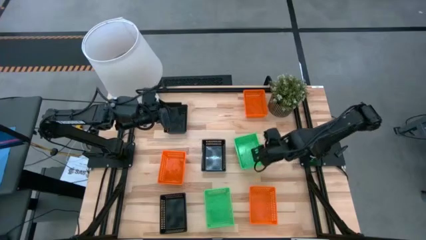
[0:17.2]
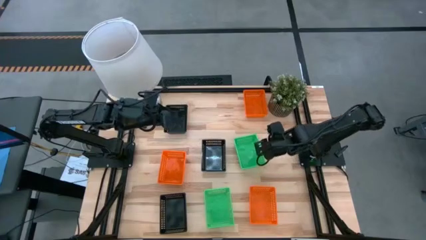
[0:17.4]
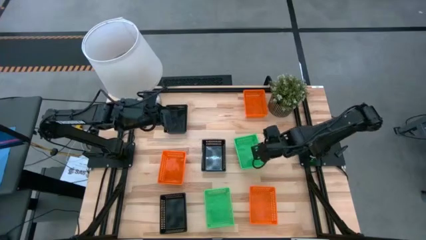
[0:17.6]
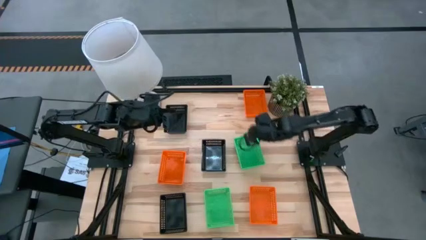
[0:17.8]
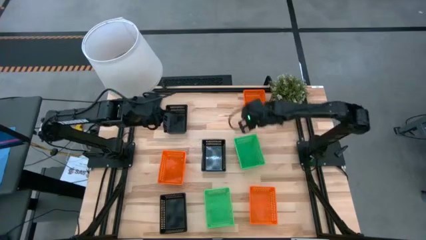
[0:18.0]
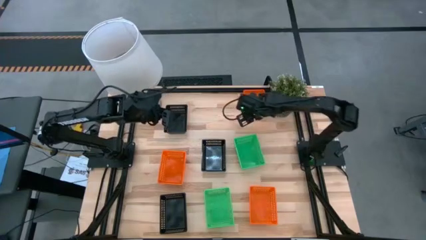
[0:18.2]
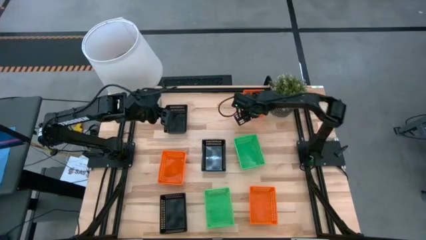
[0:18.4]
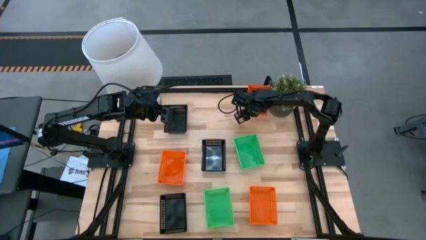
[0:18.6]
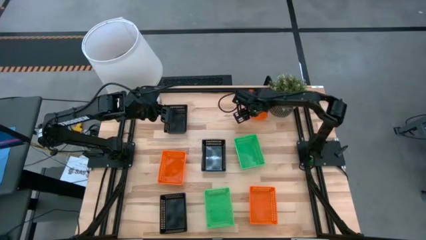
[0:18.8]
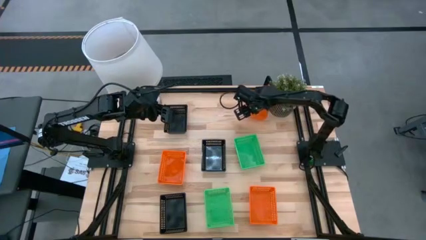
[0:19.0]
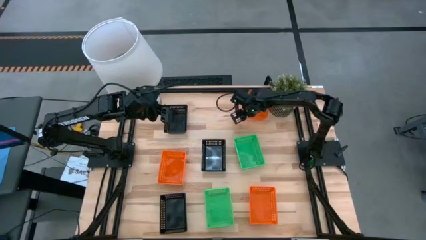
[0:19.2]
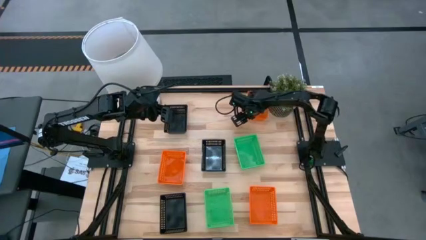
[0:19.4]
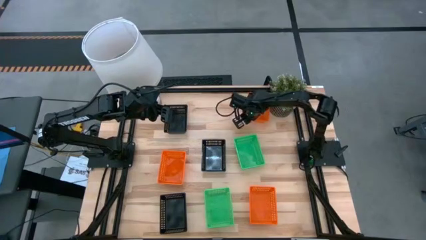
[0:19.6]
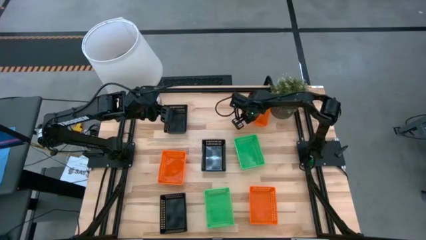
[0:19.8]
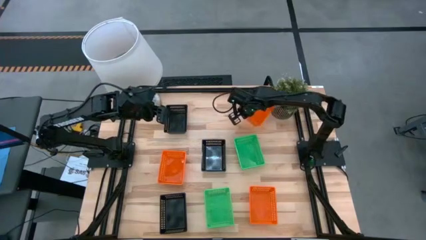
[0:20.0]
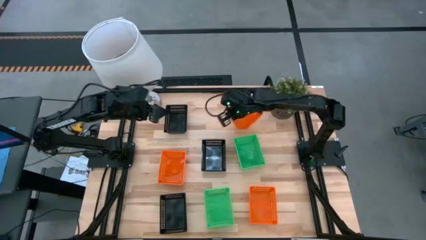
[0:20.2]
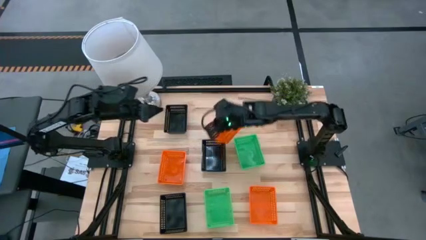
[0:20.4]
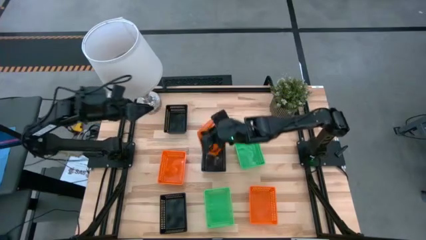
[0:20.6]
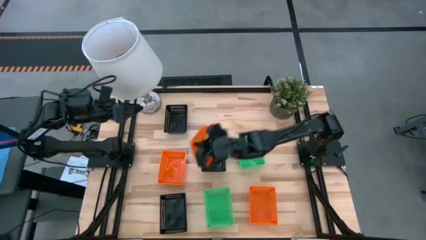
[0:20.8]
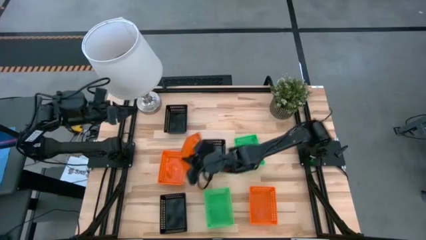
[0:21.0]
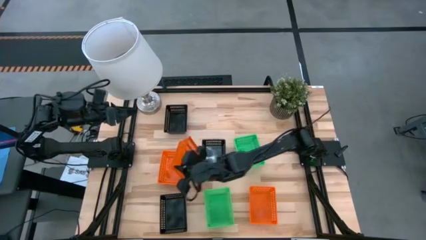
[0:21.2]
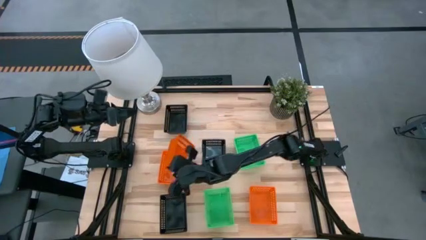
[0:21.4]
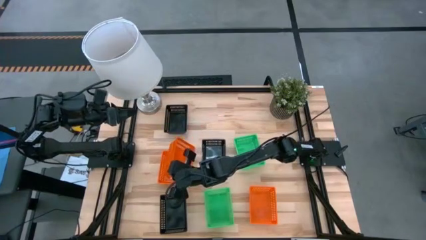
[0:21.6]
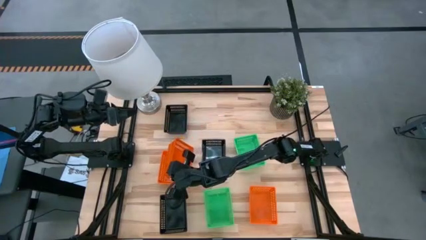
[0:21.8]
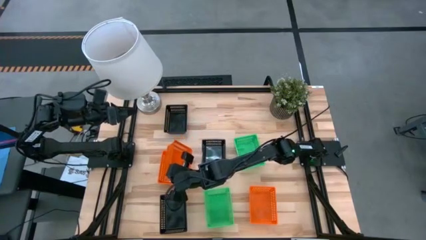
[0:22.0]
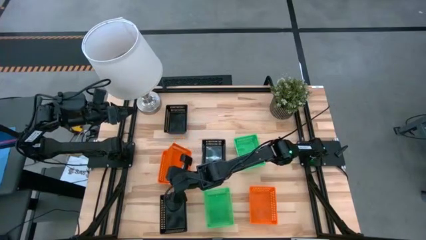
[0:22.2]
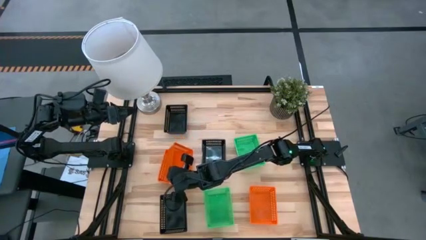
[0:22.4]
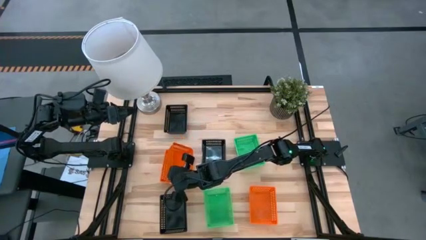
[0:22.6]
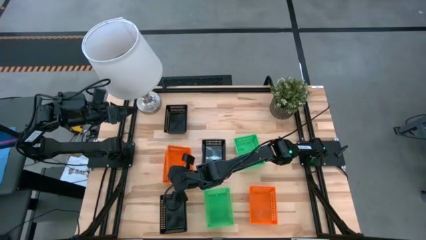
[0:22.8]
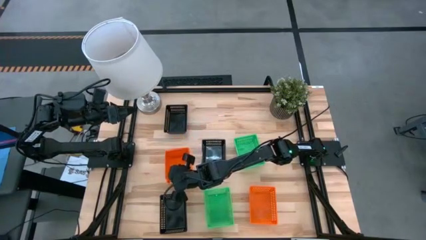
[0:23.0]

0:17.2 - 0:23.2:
Stack the top right orange bin on the middle left orange bin

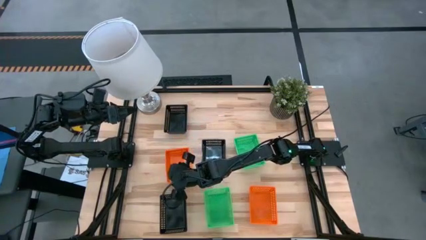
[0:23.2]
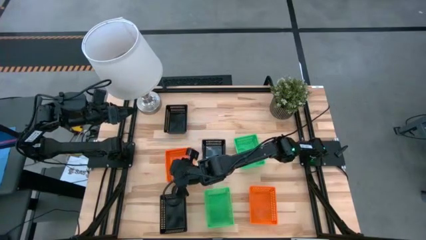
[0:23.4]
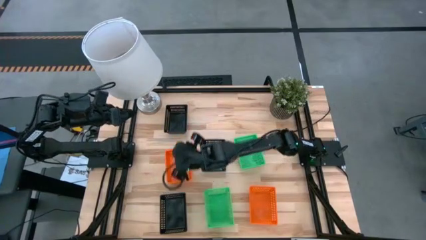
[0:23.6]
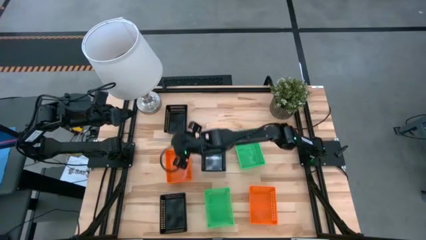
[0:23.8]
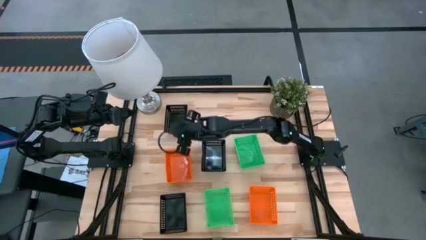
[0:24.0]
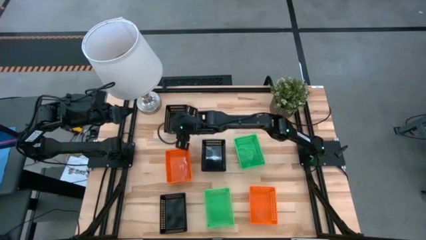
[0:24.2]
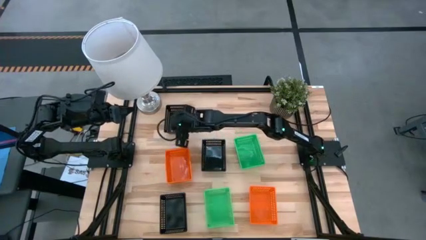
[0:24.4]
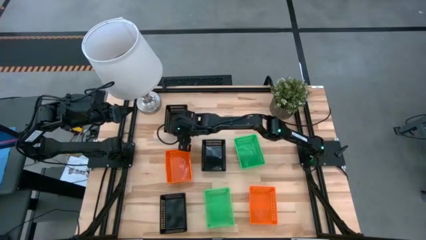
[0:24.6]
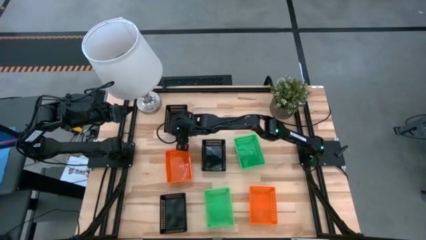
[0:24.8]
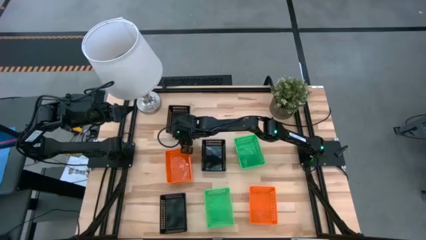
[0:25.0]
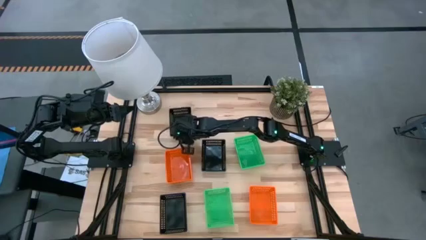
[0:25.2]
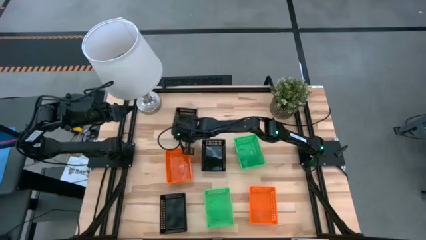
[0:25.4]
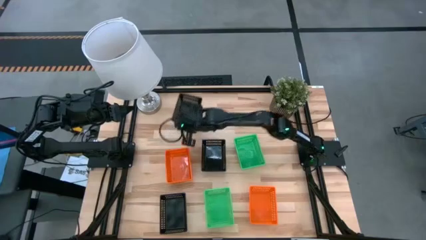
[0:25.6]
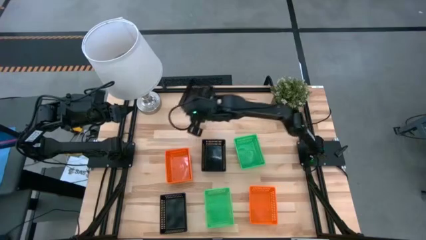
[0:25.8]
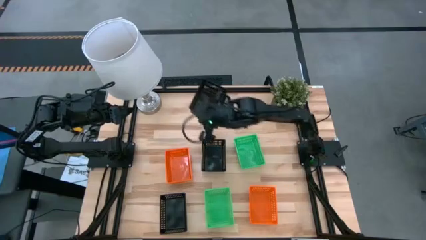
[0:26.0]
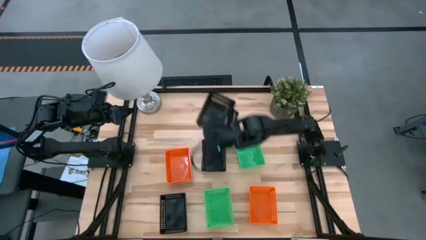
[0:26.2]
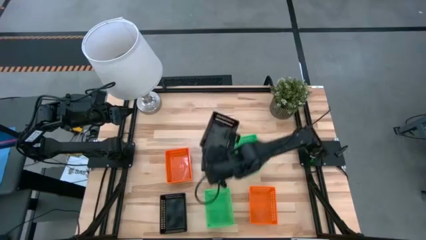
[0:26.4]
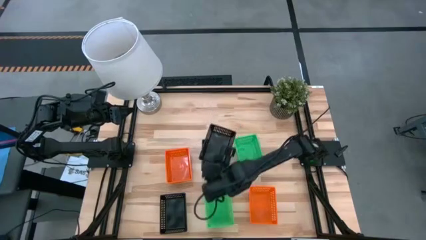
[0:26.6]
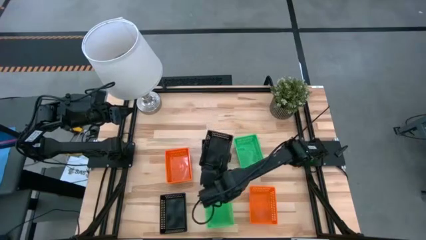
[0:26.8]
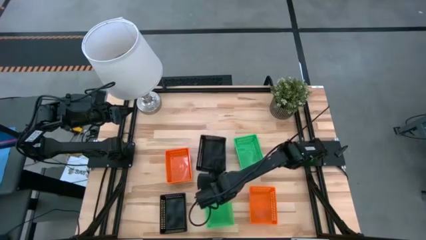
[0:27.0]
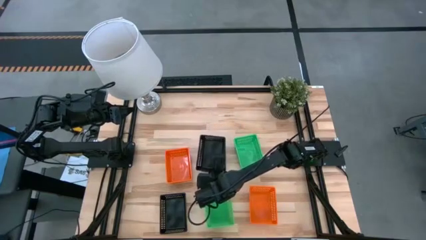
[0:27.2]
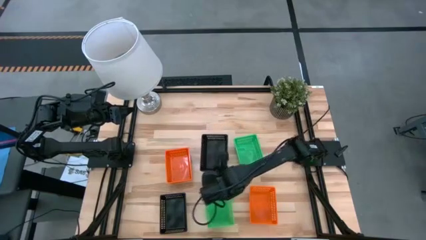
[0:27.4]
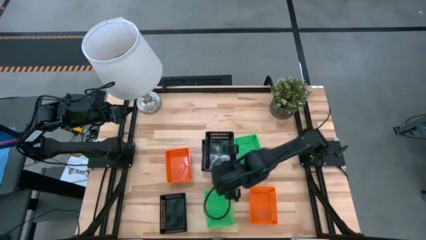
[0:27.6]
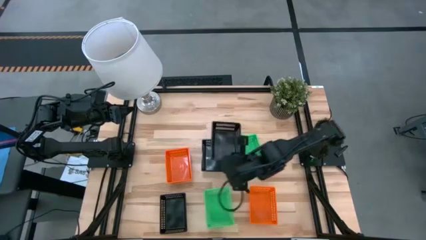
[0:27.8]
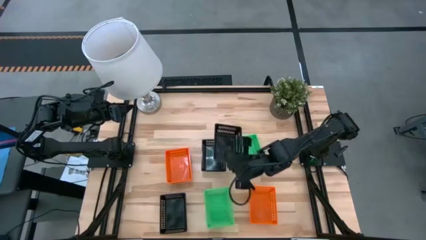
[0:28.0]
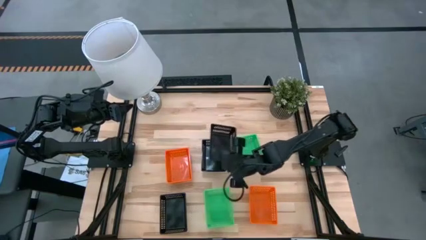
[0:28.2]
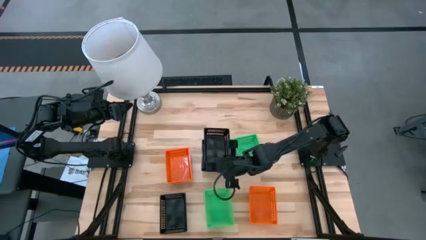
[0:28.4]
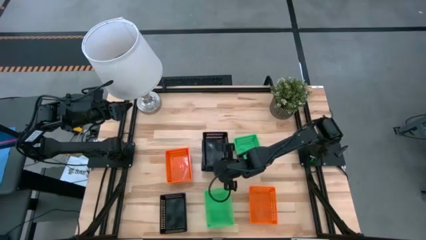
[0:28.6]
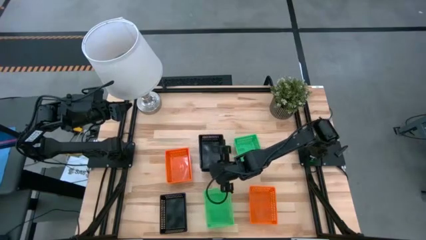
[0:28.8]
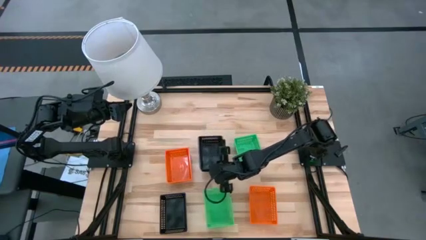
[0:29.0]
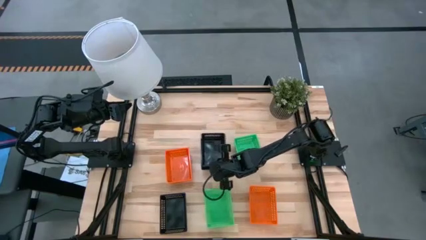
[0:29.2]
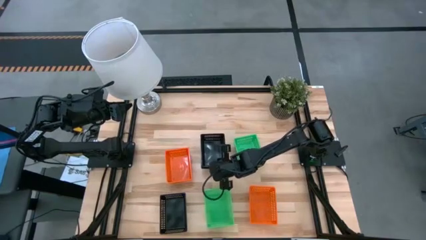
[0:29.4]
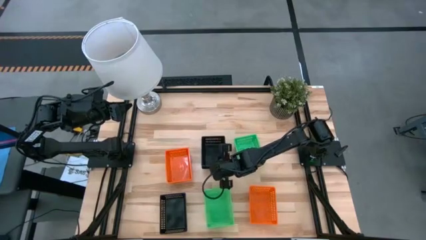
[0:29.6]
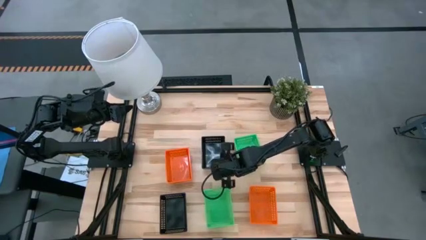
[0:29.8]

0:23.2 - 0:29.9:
Stack the top left black bin on the middle black bin

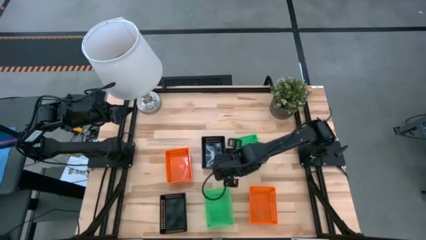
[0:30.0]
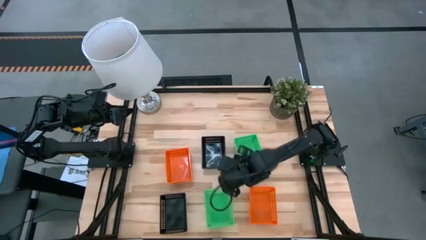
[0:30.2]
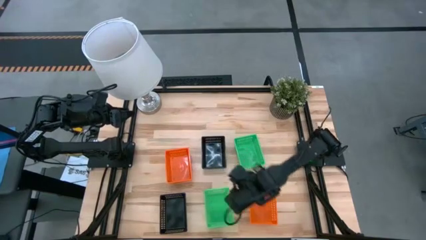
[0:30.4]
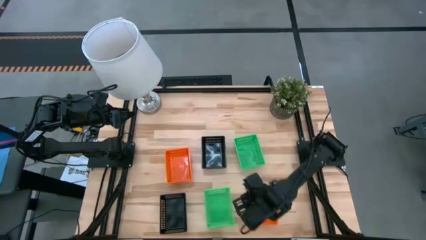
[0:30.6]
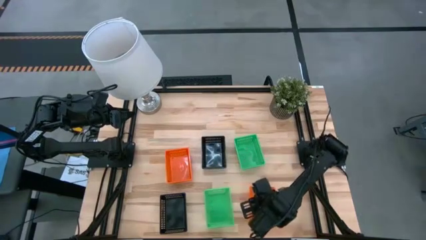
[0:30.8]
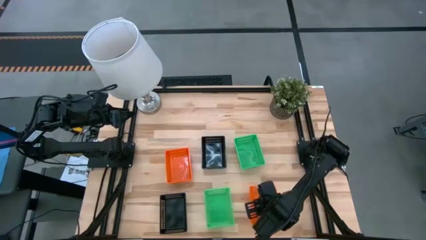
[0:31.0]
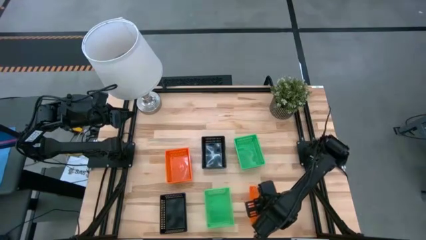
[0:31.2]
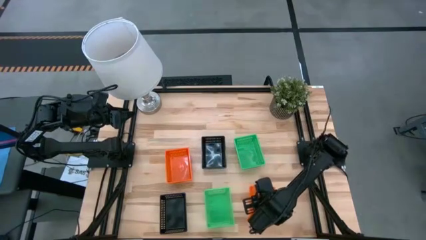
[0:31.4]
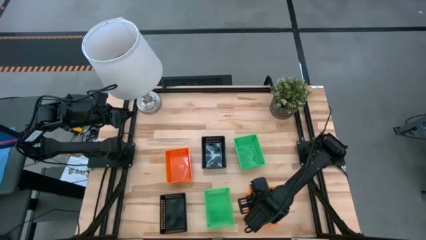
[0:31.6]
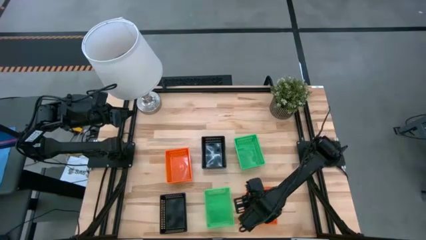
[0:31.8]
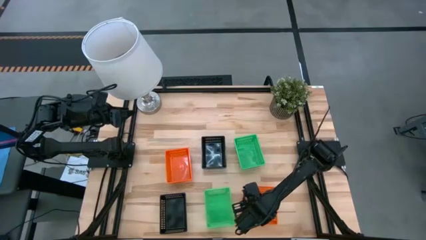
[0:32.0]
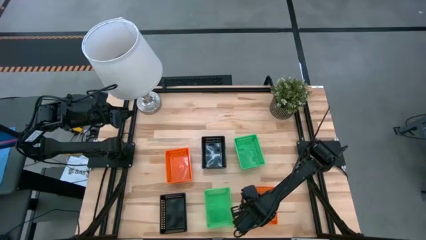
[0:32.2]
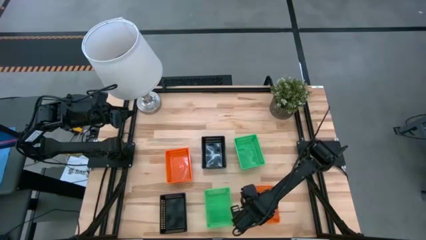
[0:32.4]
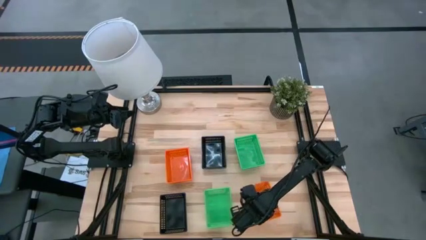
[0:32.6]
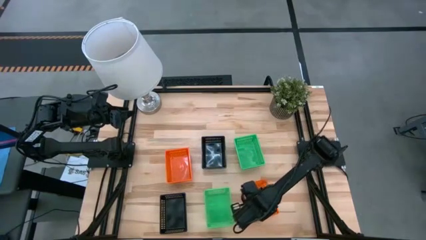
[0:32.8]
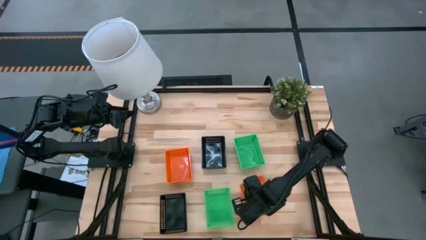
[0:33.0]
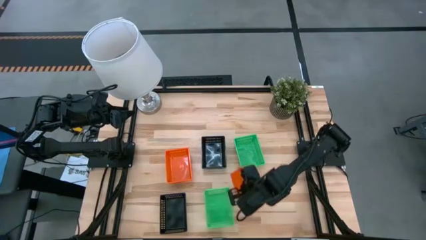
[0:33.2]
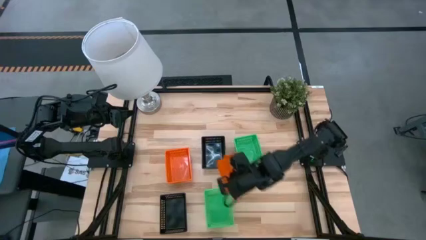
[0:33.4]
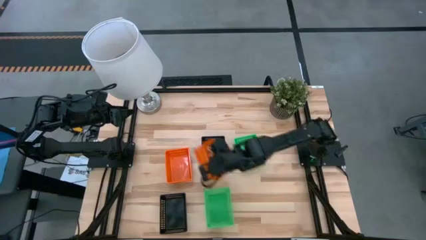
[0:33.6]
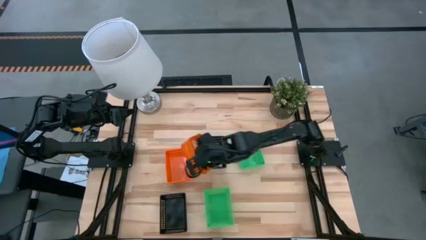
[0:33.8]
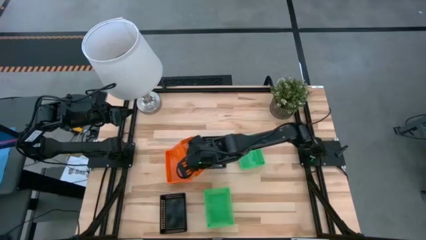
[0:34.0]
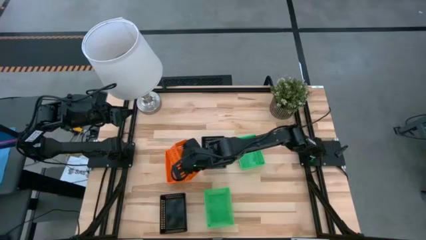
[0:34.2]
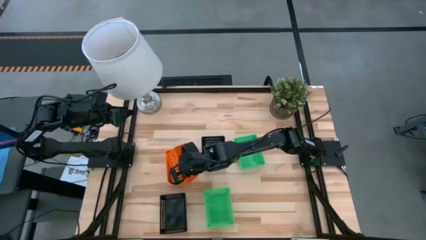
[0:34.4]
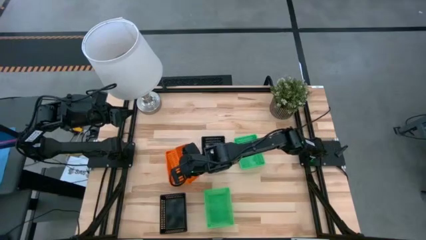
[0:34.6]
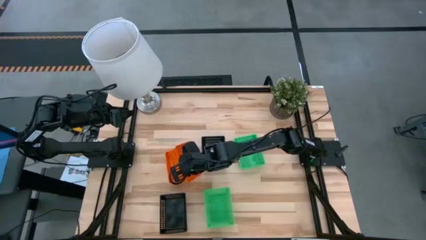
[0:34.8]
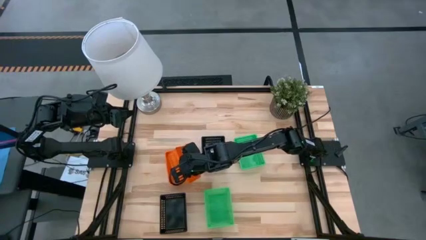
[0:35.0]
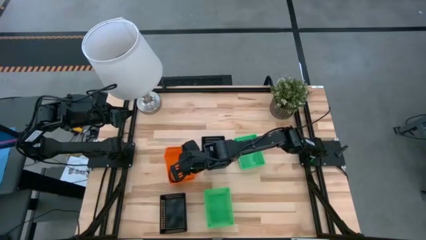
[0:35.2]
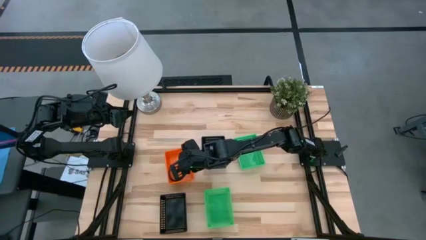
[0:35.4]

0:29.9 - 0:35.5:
Stack the bottom right orange bin on the orange bins
